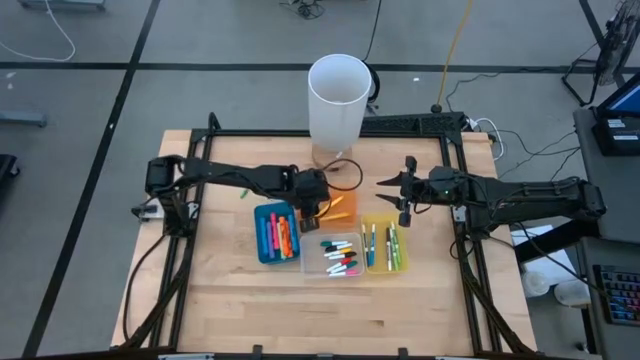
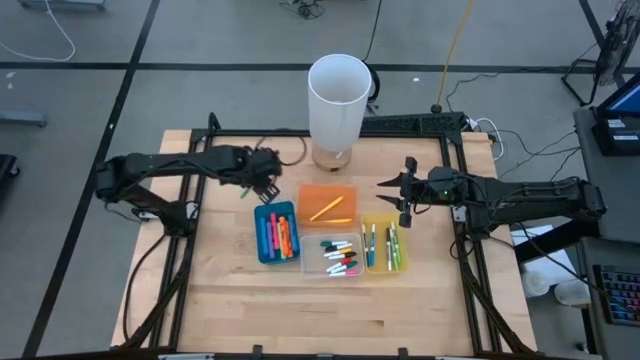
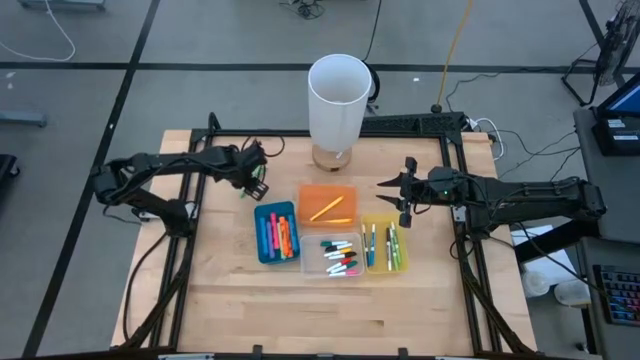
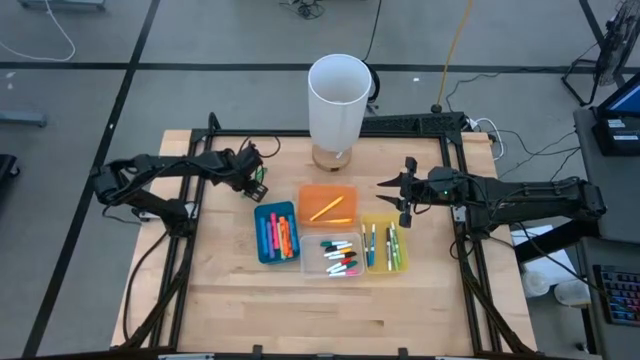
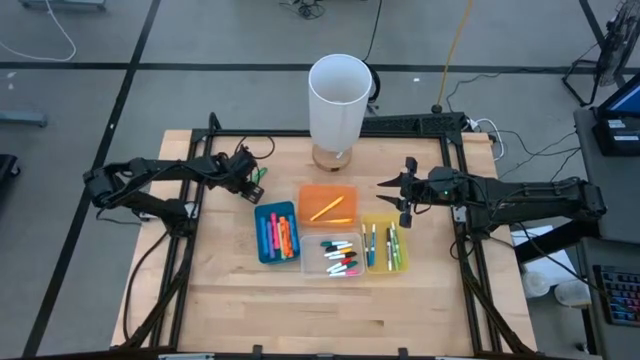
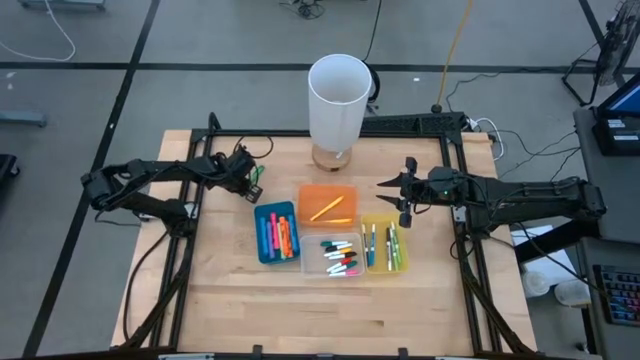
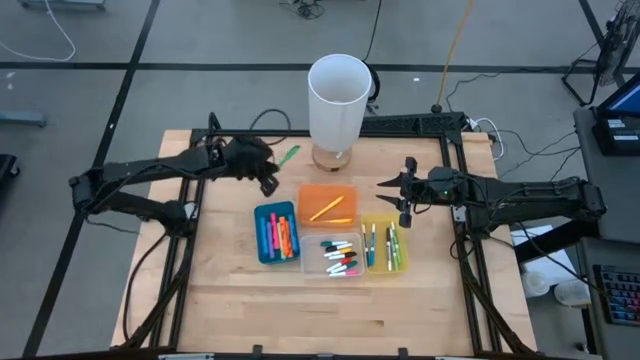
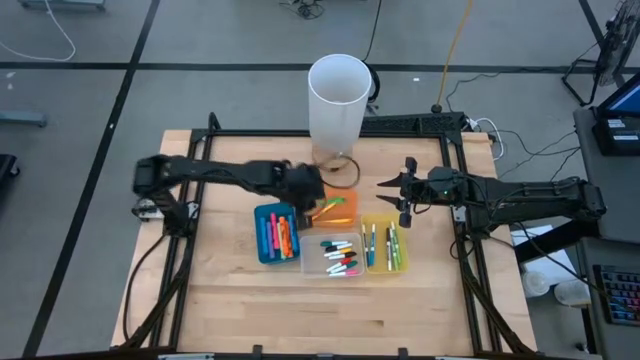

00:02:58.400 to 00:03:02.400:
Task: Pick & Place Markers
Put the green pen into the orange bin

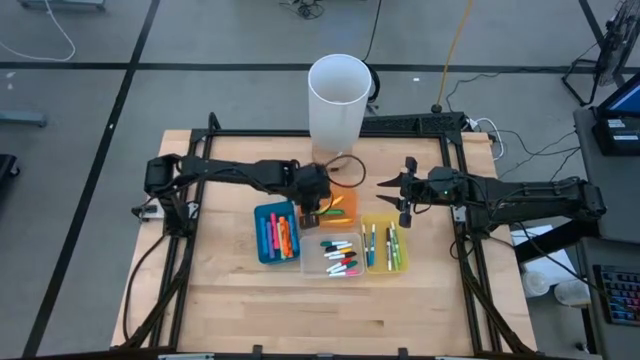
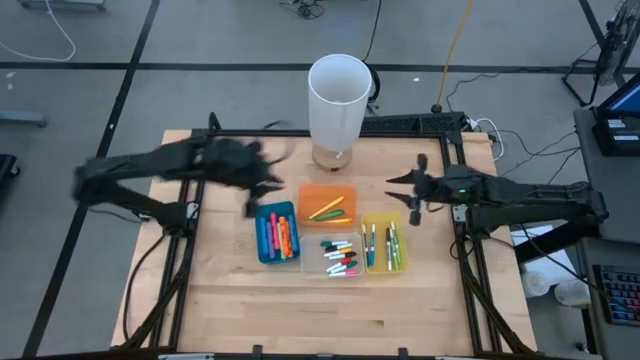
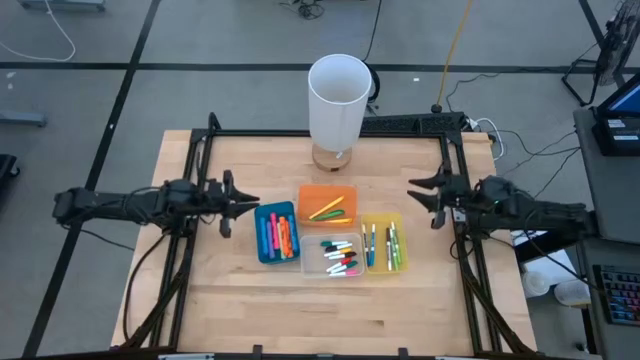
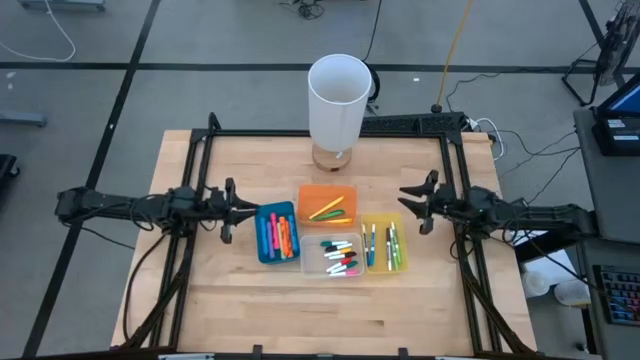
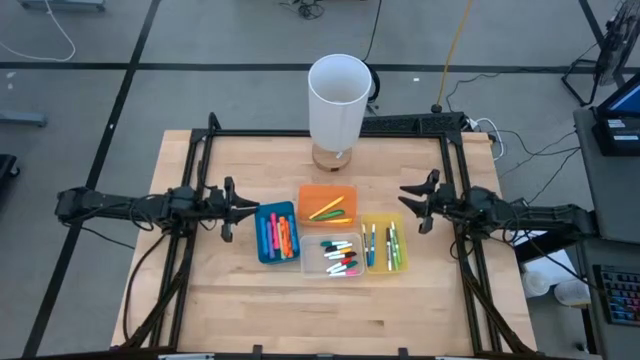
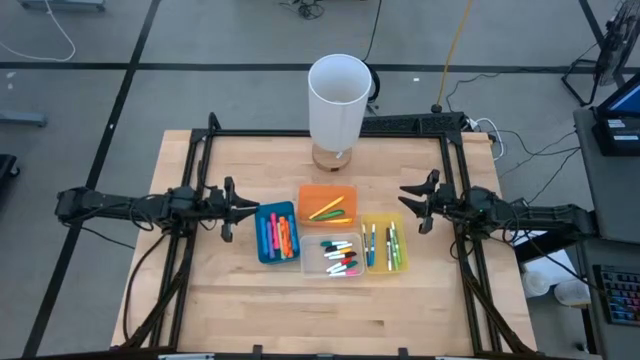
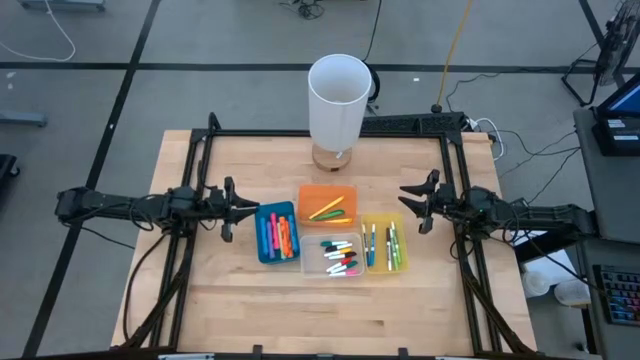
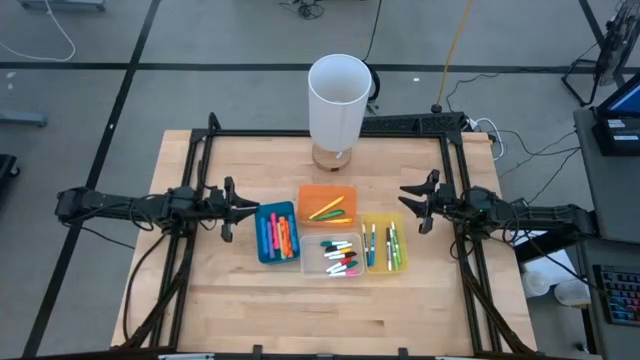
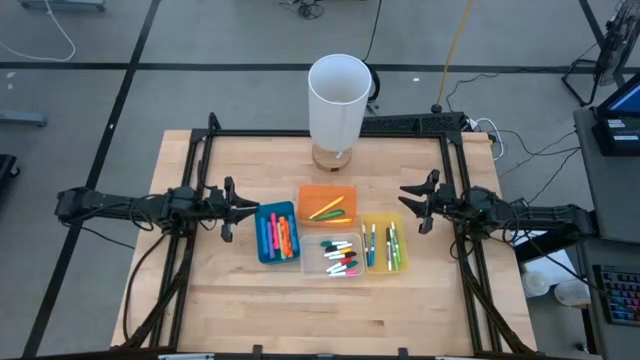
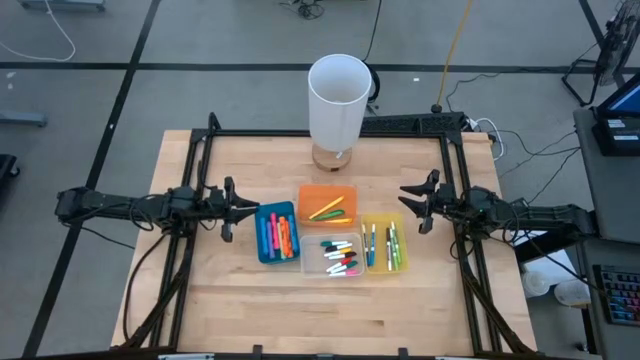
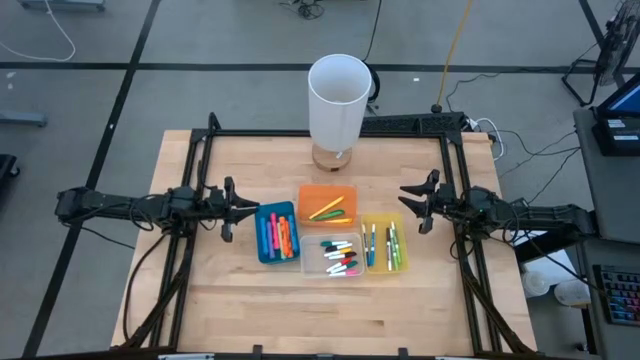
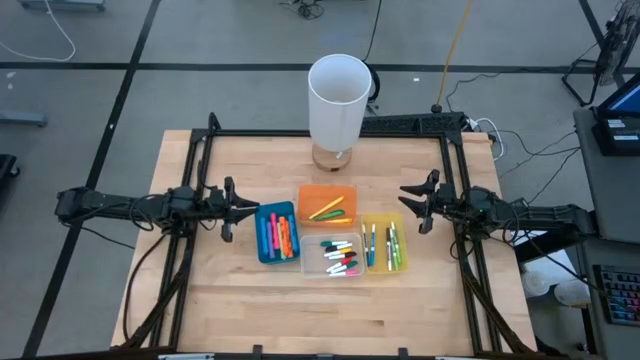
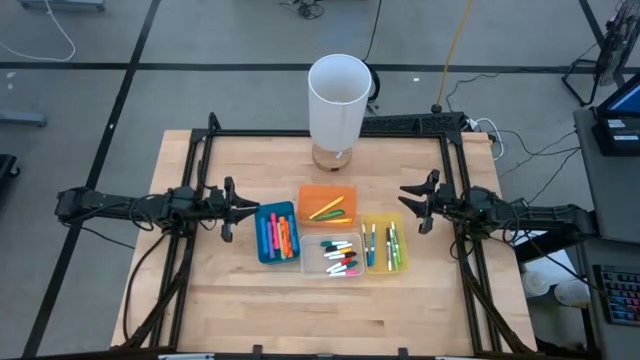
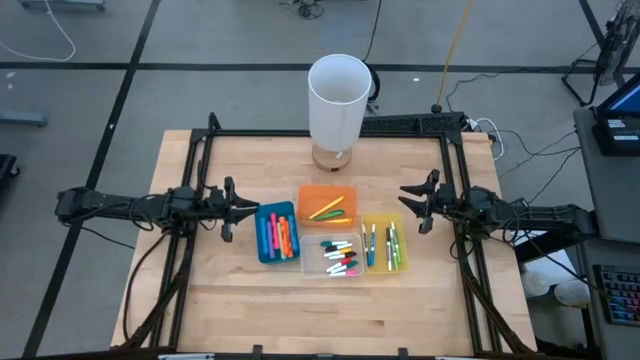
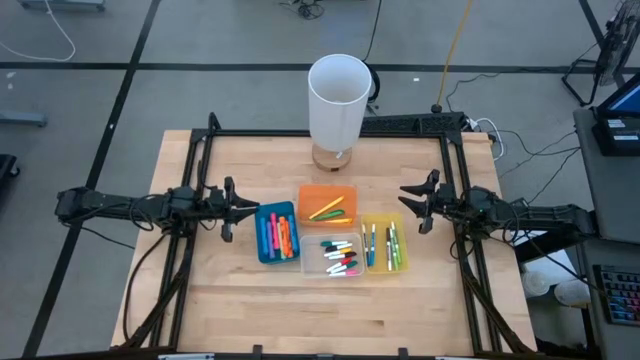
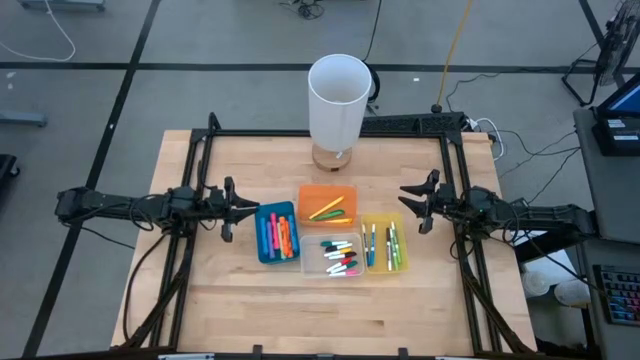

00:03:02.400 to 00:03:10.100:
Return to Home Position

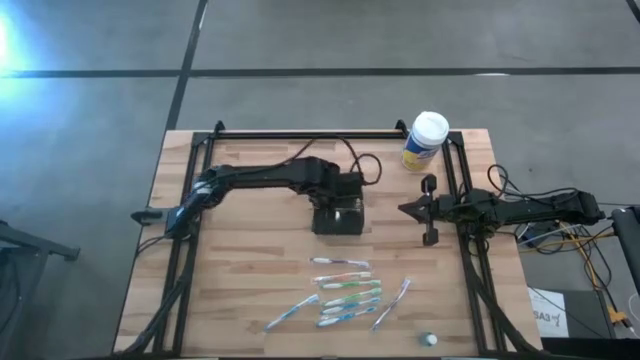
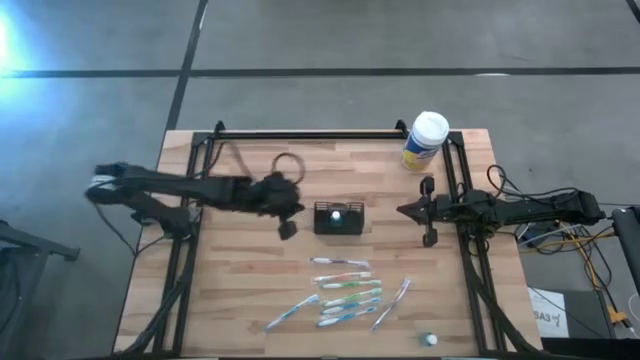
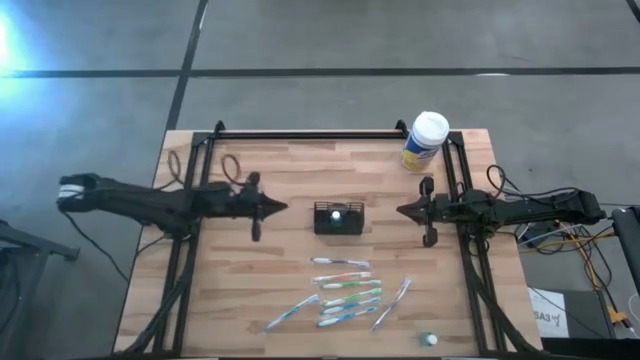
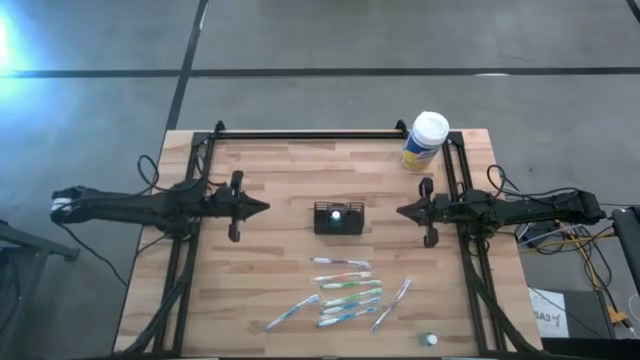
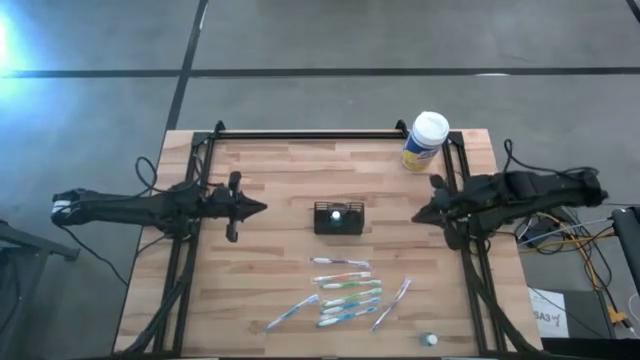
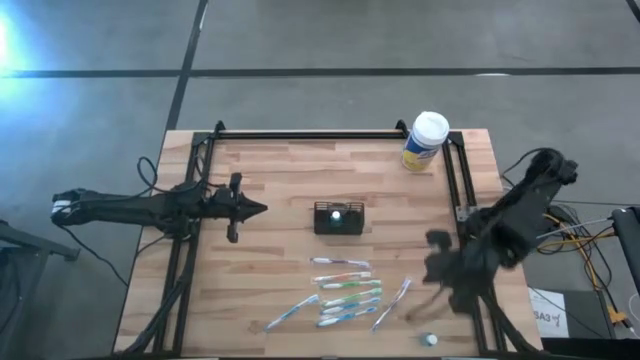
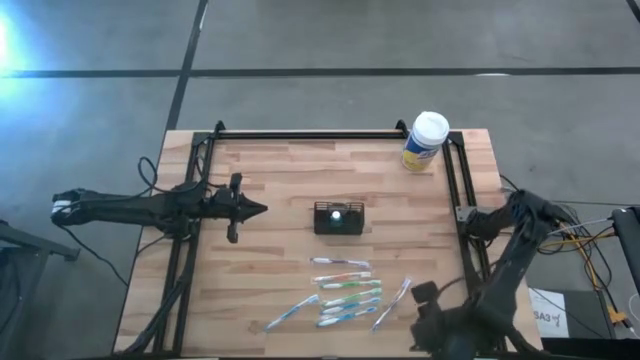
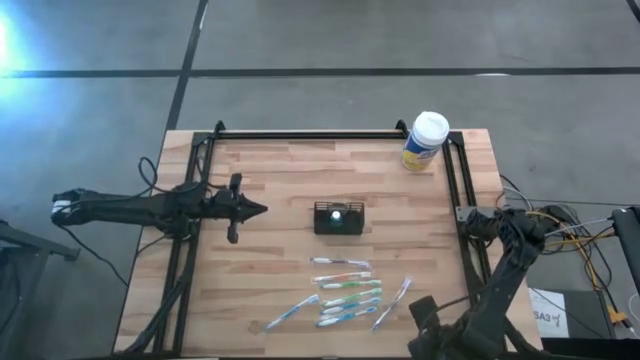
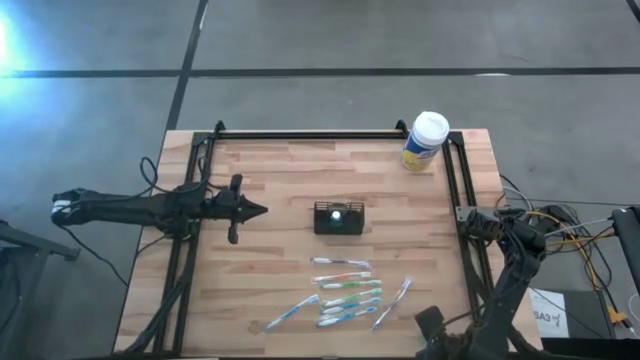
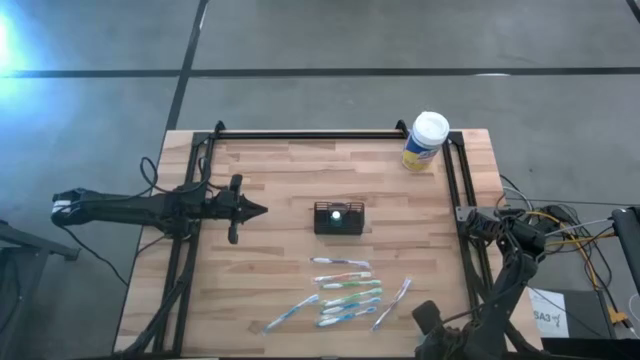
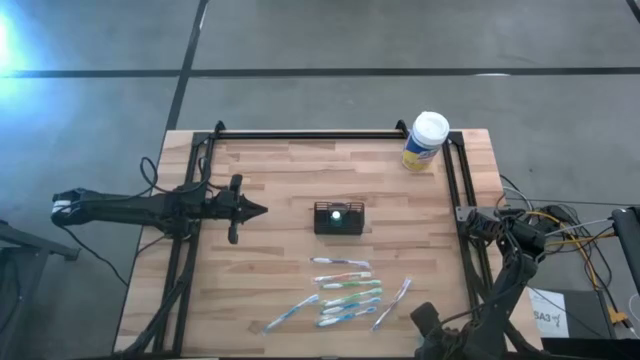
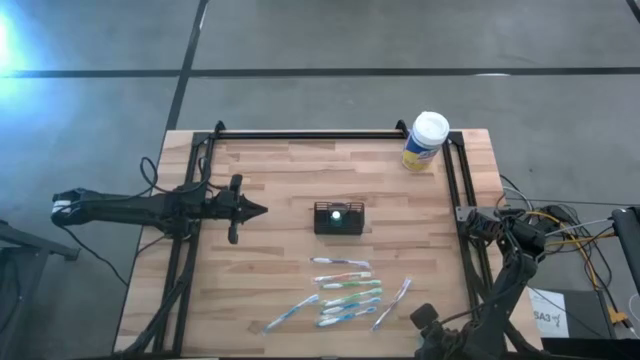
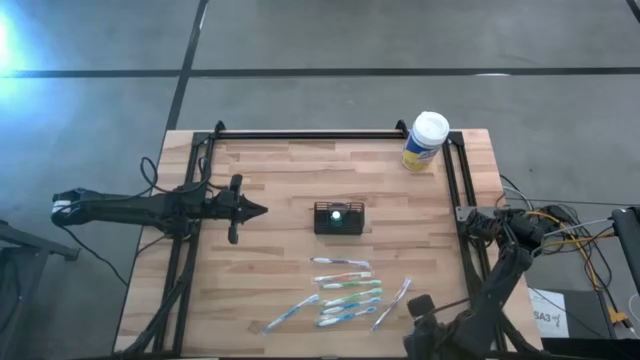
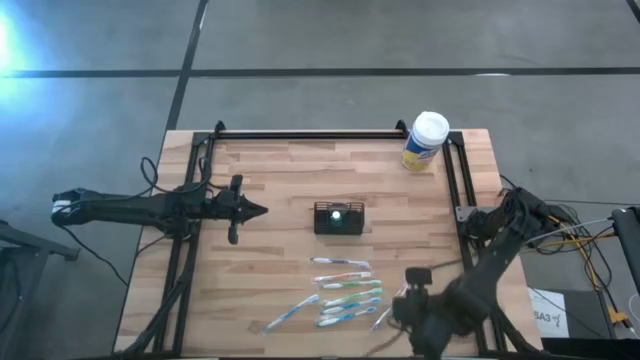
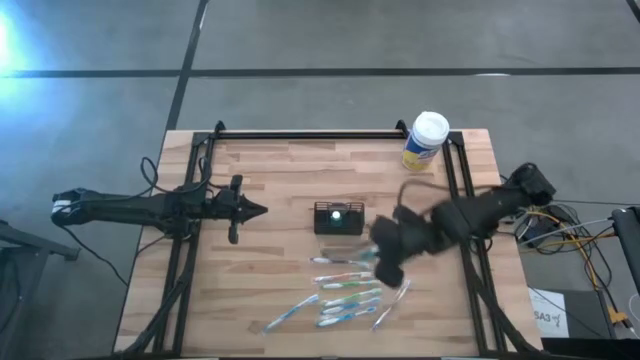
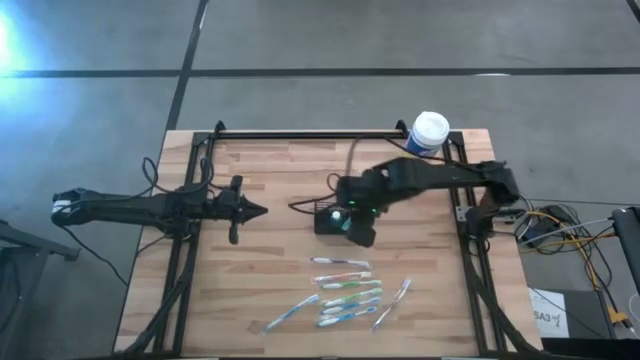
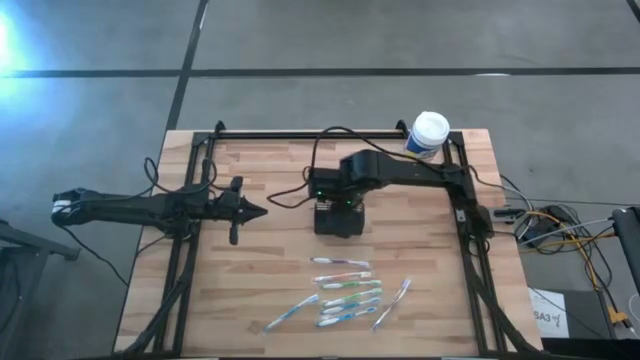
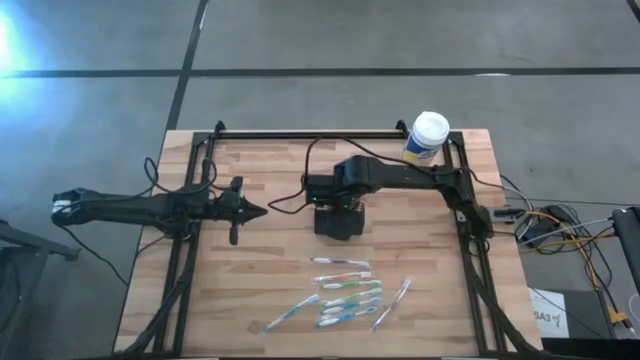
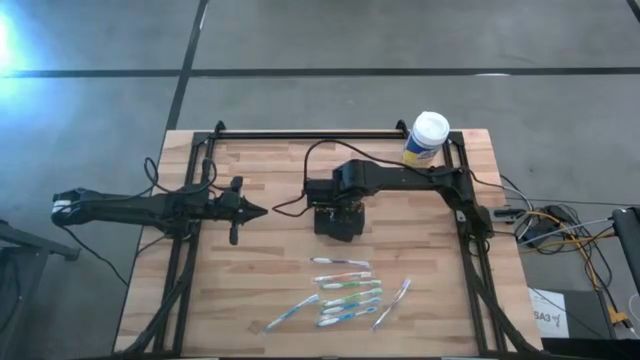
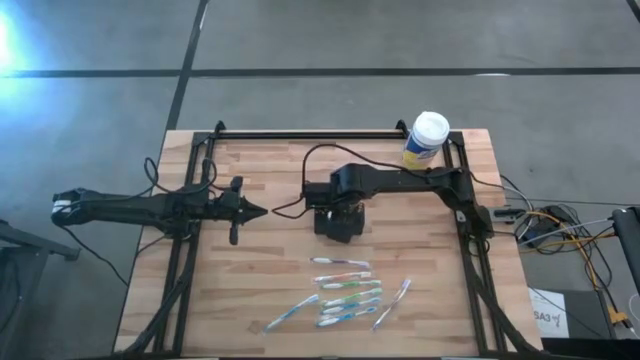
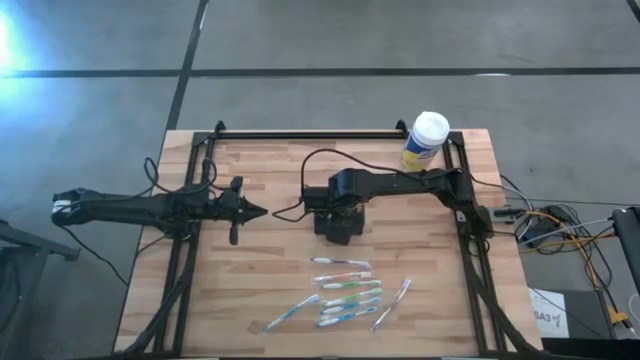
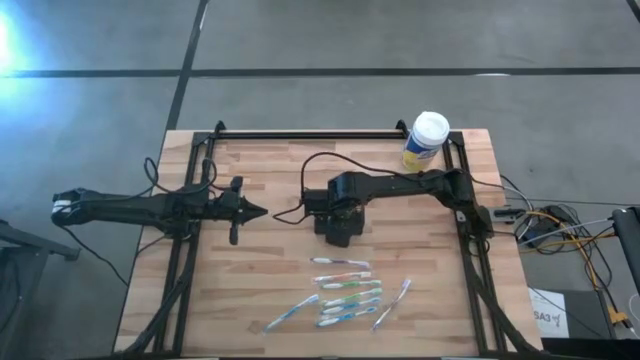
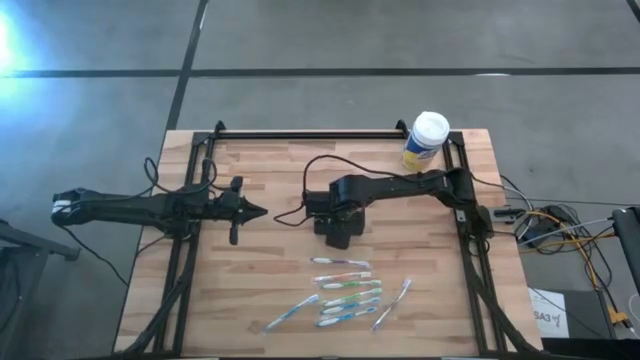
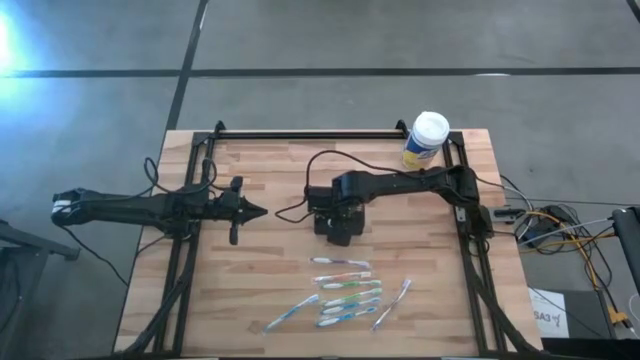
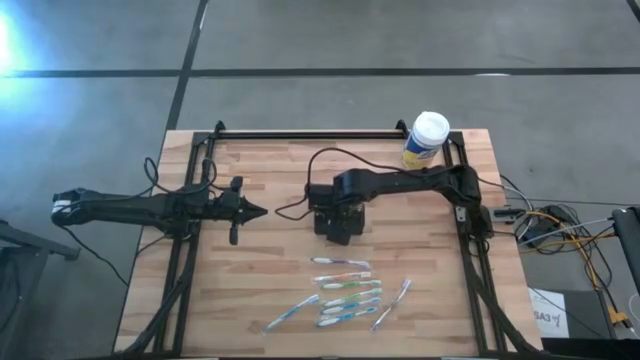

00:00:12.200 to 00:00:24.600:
Task: Pick & Place toothbrushing station
Put the mouthwash bottle into the wire organizer
